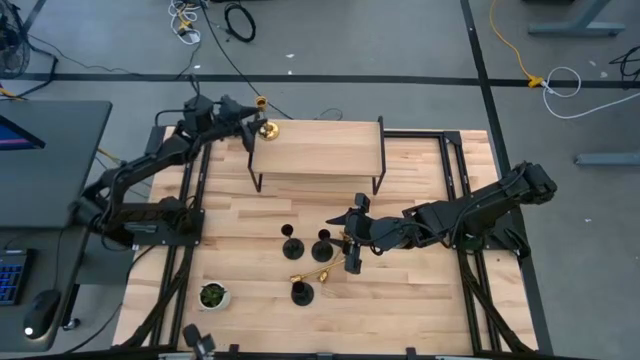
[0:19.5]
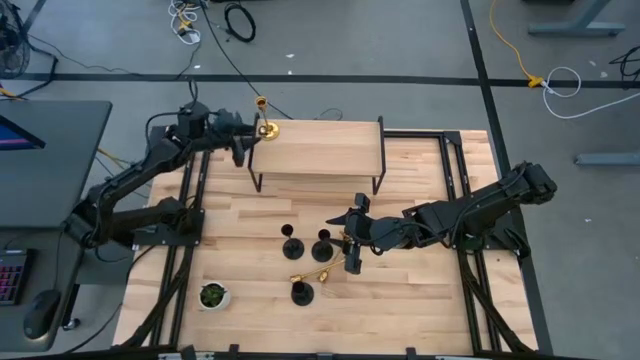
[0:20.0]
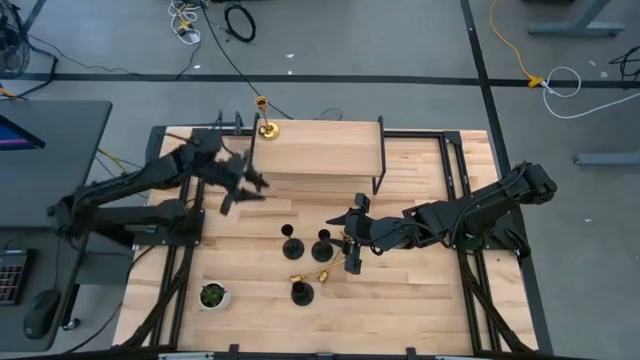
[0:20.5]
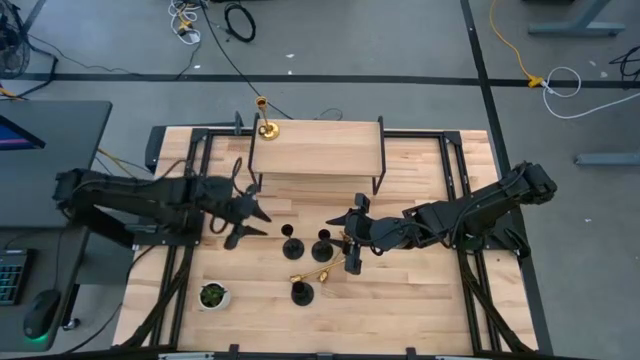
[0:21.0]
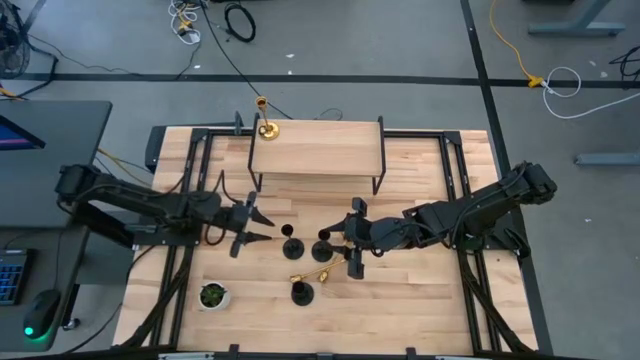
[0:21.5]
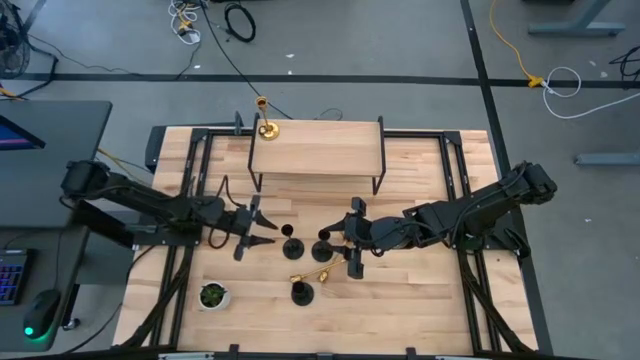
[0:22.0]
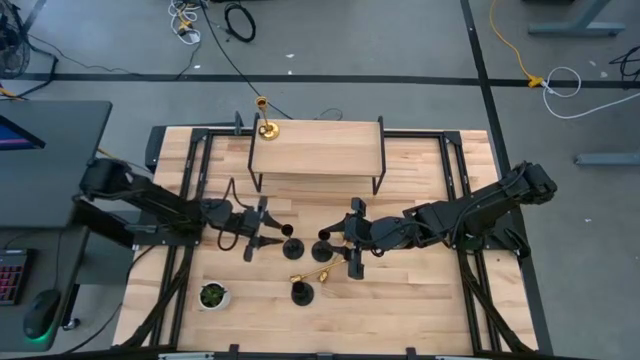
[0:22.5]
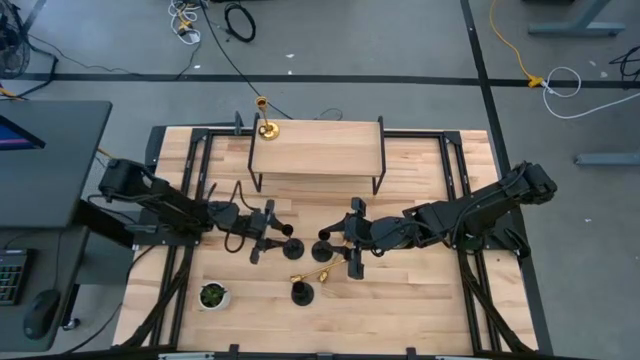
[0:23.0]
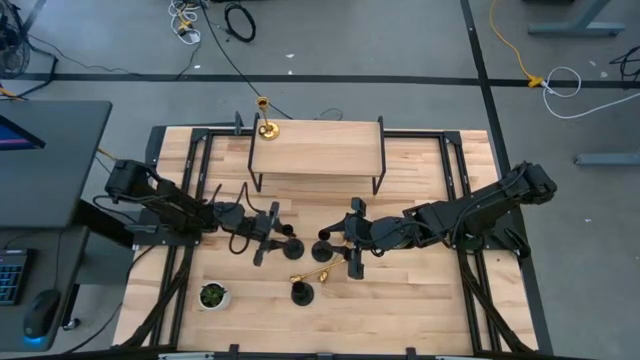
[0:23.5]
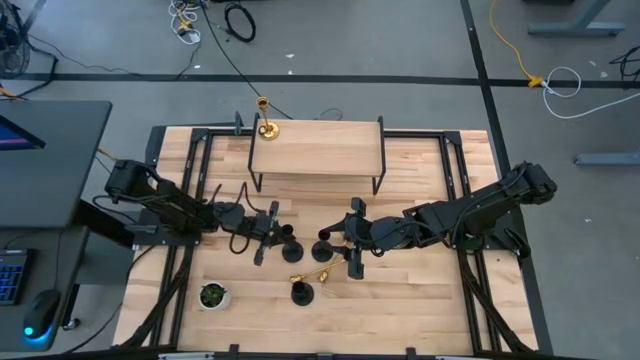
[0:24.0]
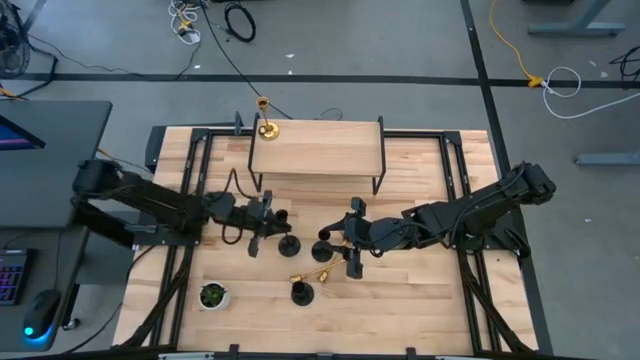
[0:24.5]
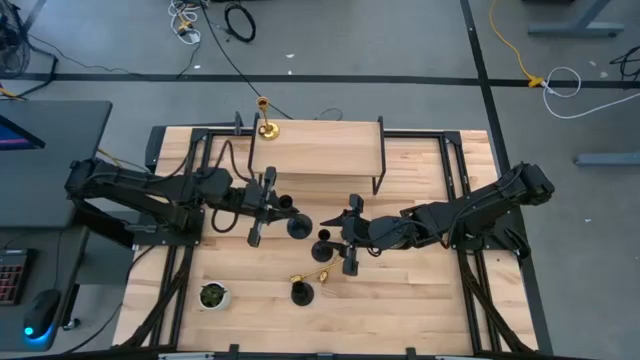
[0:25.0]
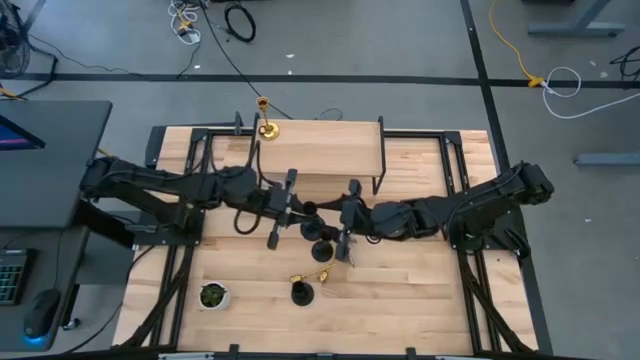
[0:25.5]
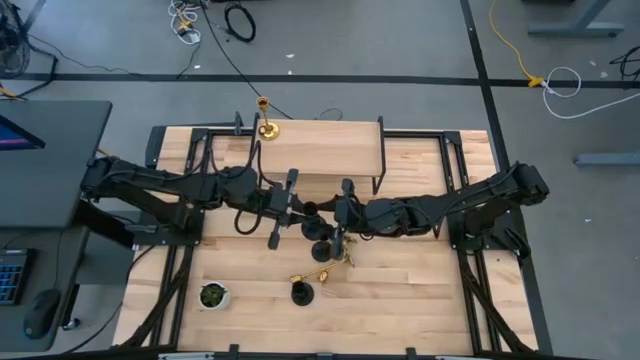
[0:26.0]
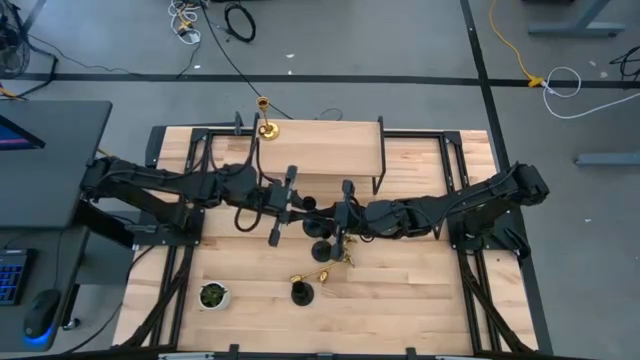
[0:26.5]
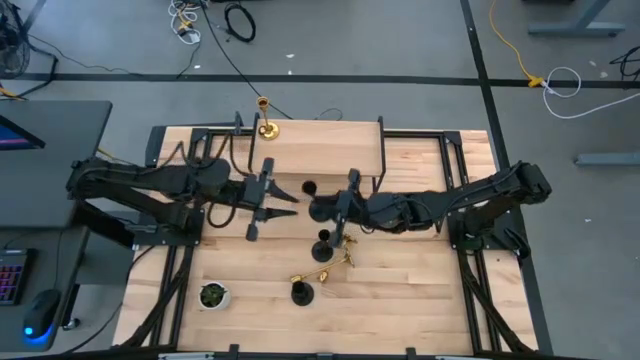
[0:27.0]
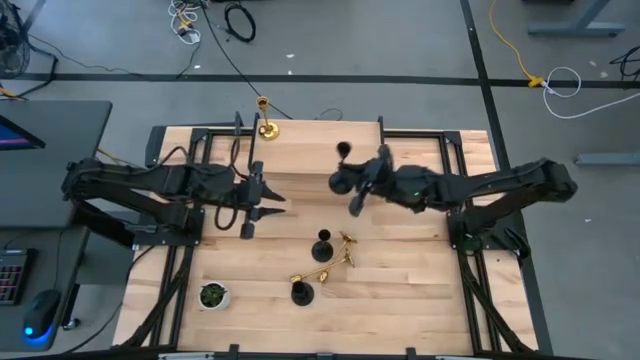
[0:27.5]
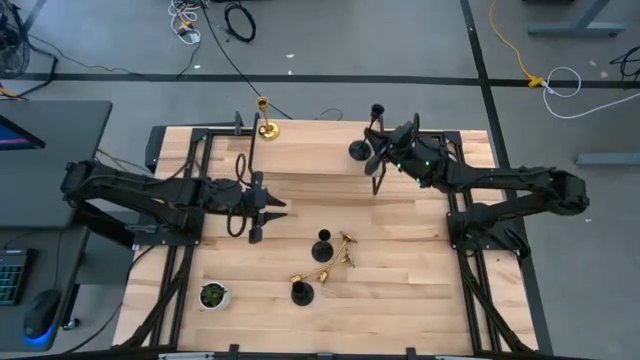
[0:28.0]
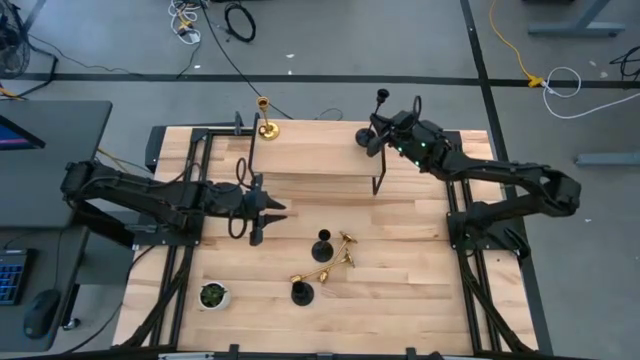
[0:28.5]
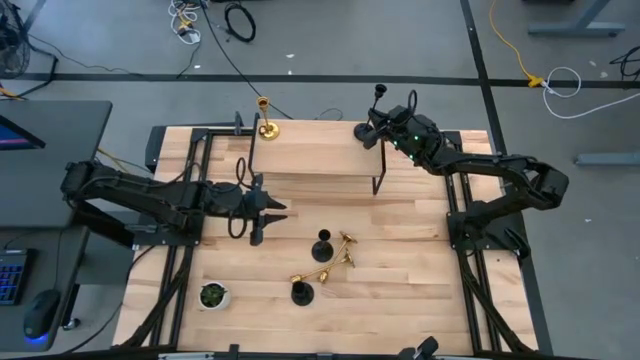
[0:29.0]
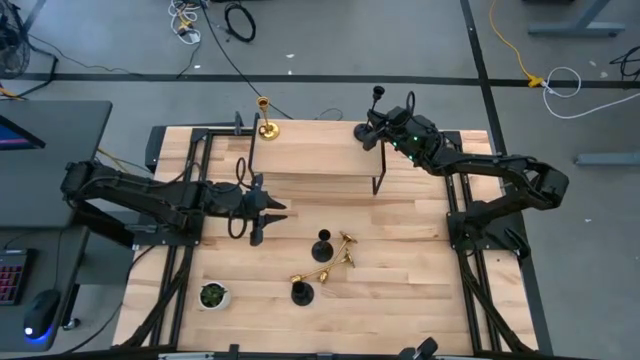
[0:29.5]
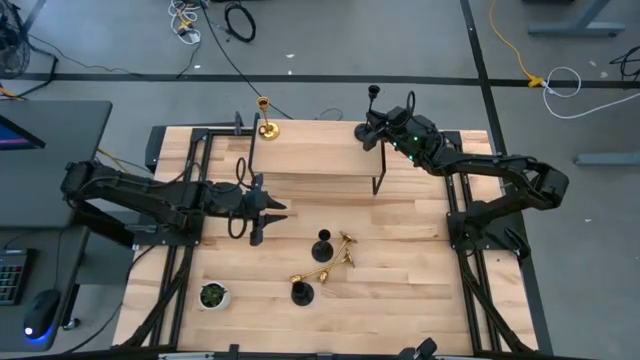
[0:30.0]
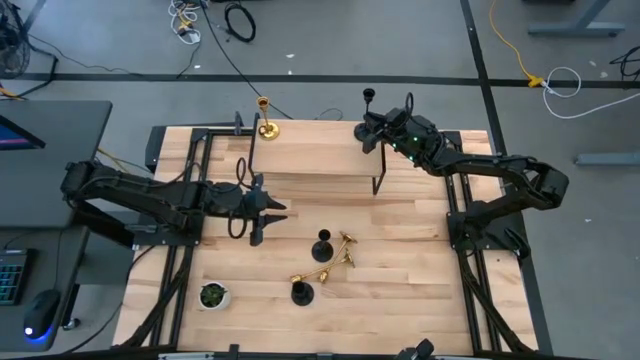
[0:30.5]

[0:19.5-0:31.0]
Task: Pick & Place candle stick holders
Put the top left black candle holder on the shelf

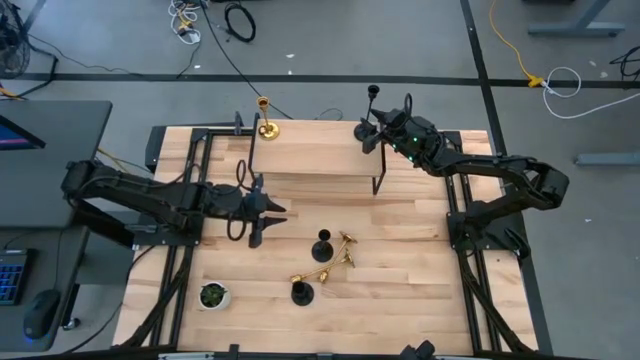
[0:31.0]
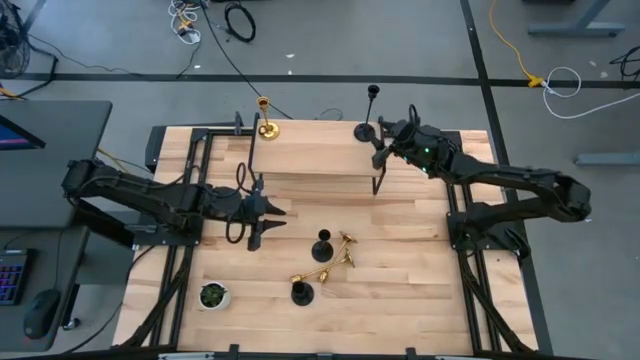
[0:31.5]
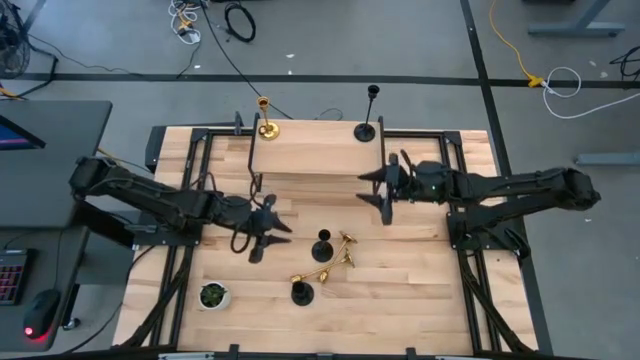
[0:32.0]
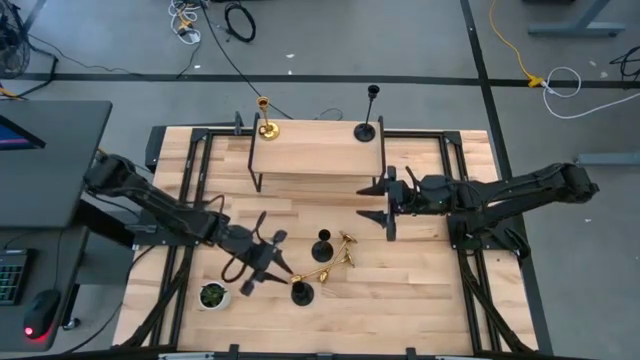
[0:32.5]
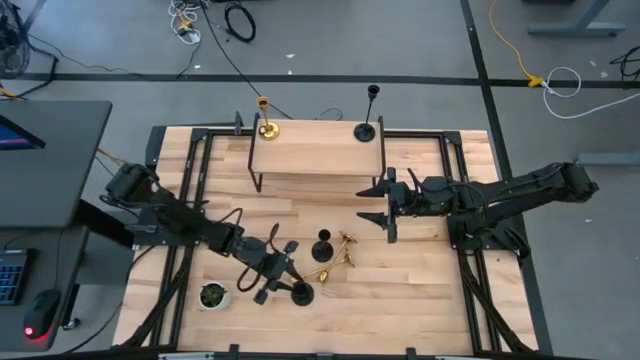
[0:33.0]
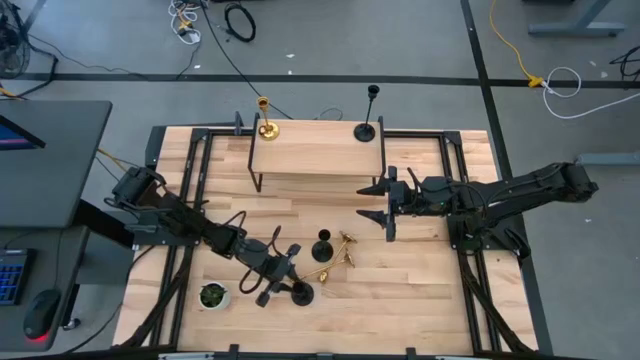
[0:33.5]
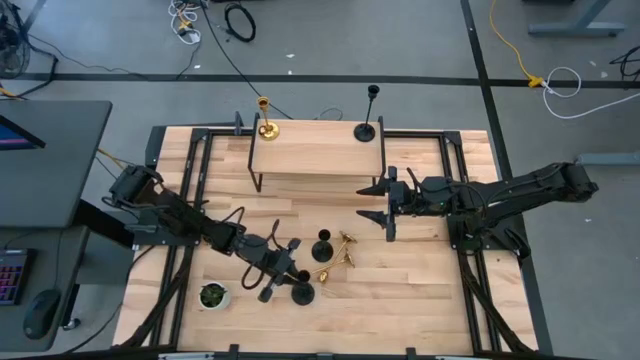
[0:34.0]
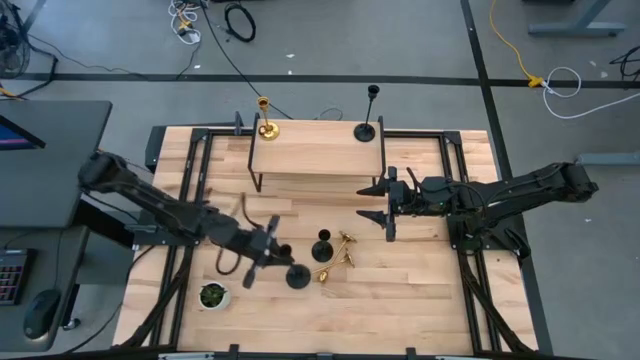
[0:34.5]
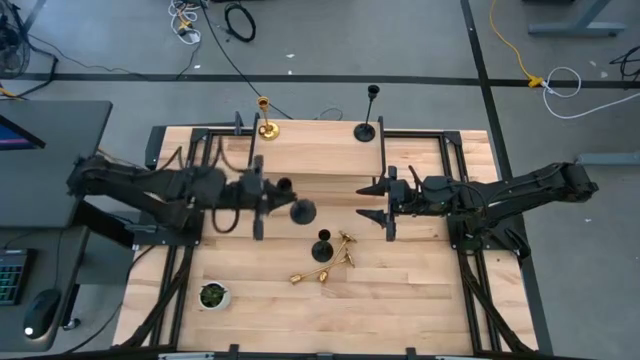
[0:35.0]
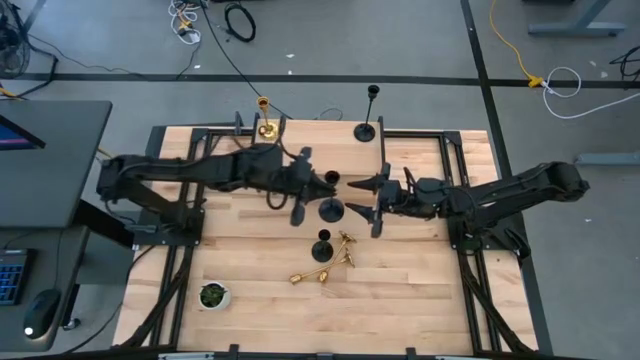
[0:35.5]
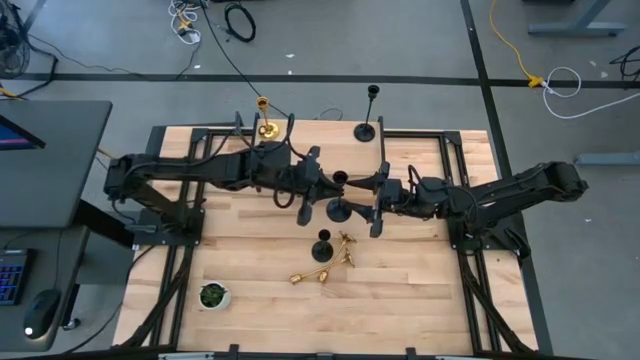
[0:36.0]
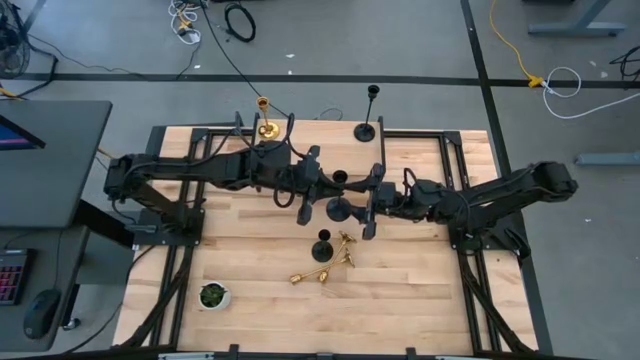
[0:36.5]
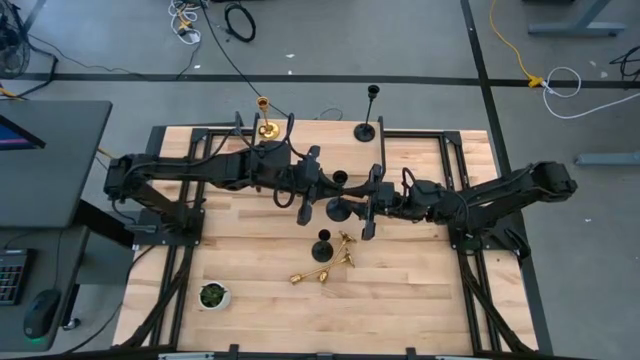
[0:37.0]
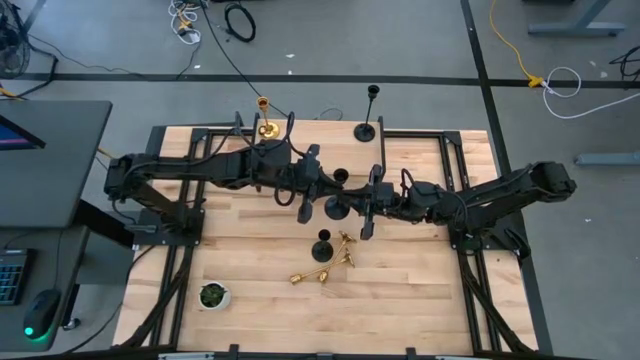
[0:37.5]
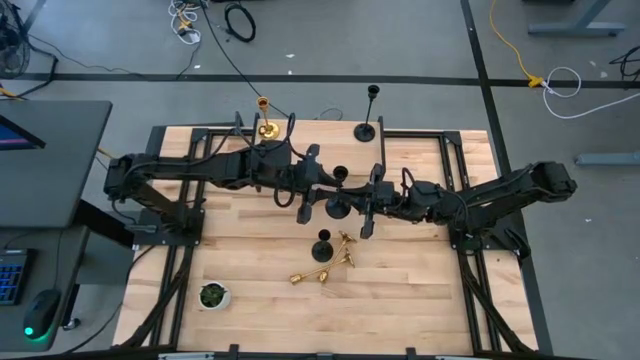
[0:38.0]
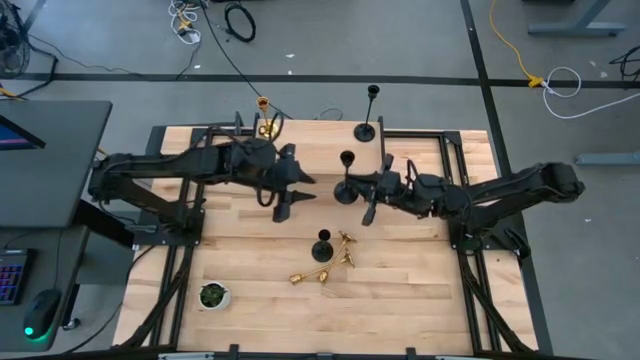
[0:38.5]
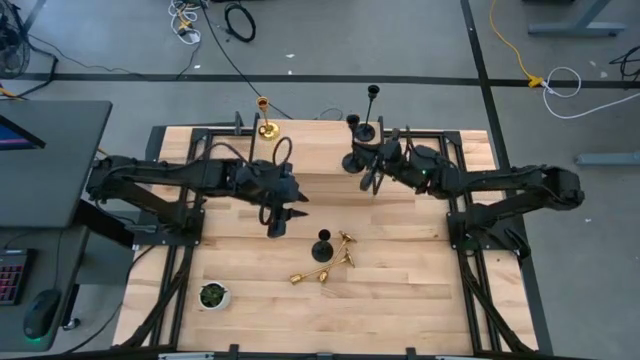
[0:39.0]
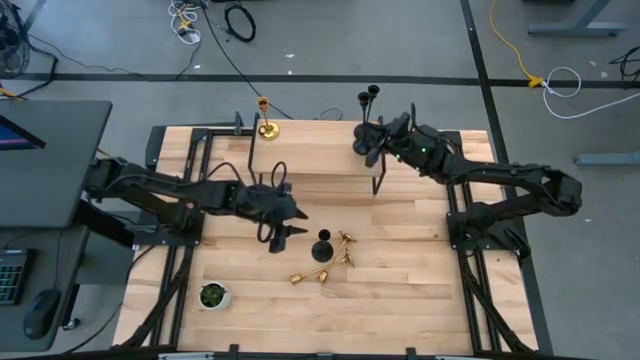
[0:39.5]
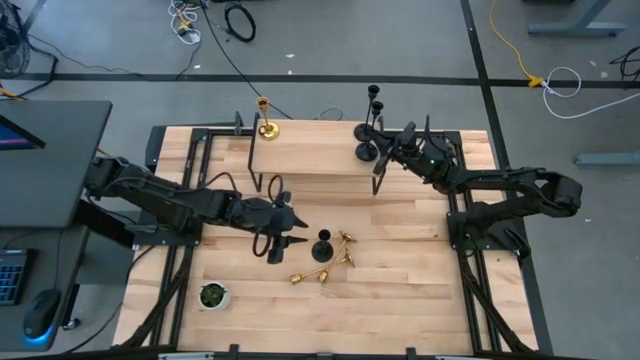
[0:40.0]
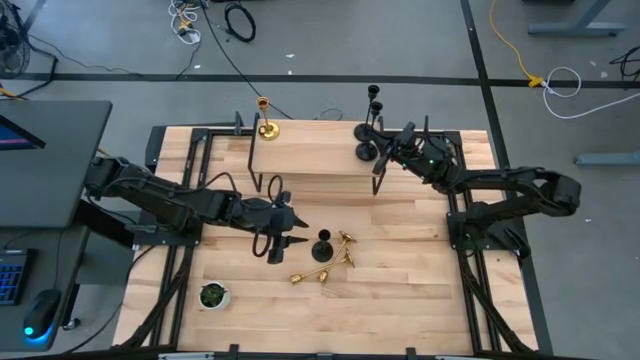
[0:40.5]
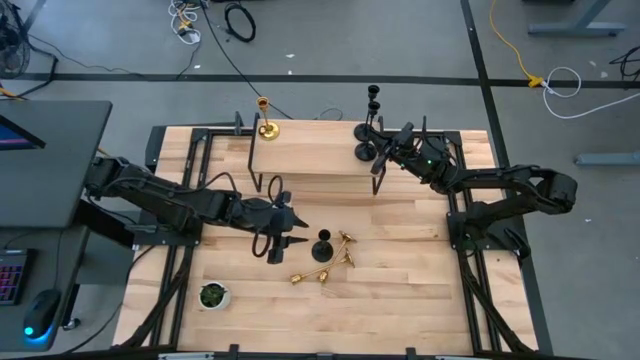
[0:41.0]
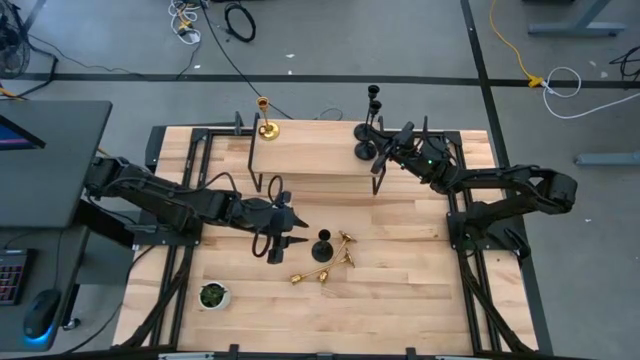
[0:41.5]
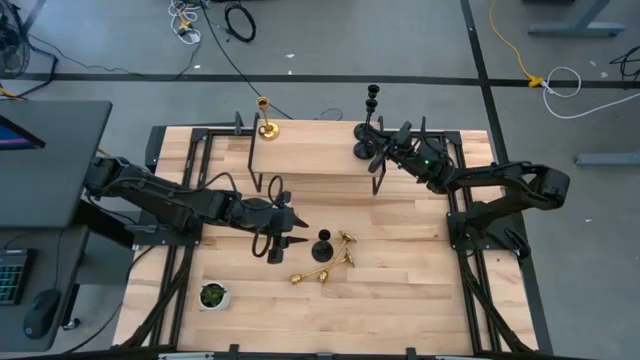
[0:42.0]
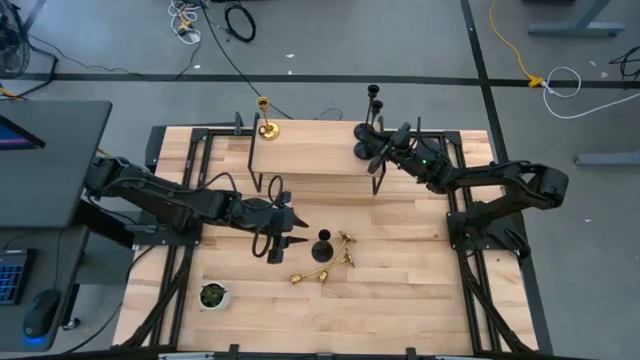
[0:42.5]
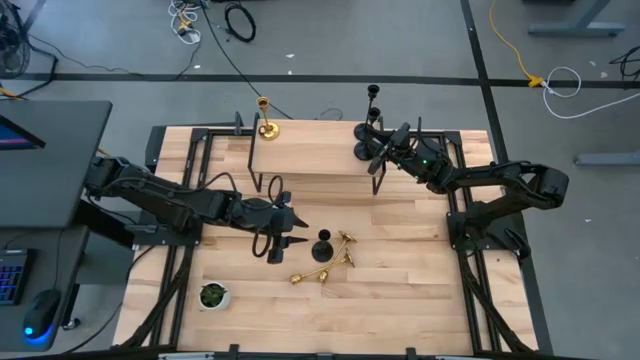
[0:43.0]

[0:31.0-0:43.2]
Put the bottom black candle holder on the shelf aligned with the other black candle holder
